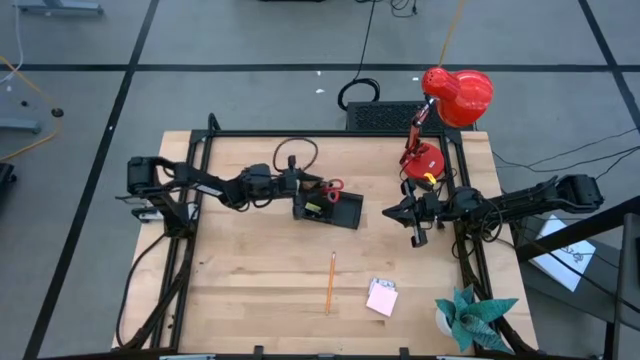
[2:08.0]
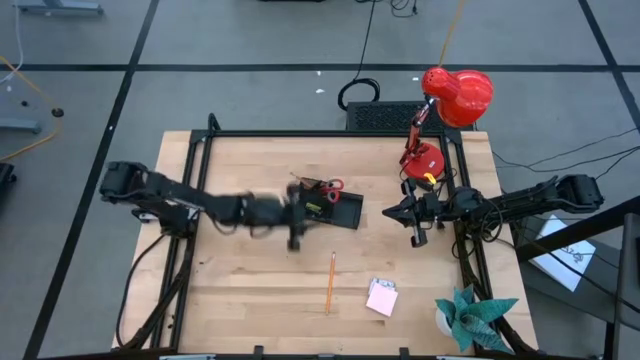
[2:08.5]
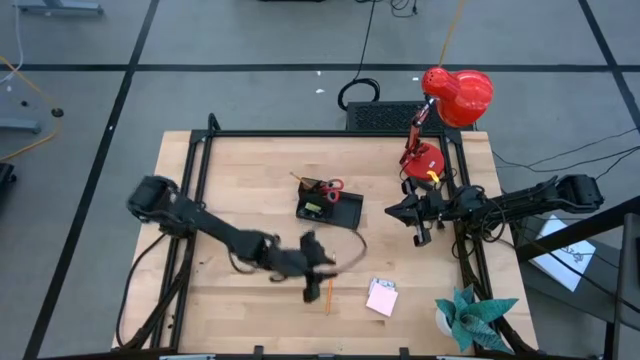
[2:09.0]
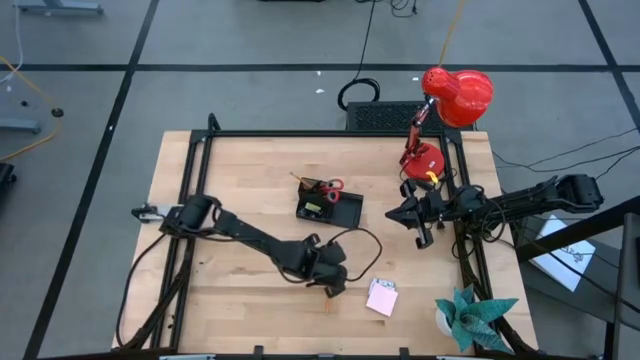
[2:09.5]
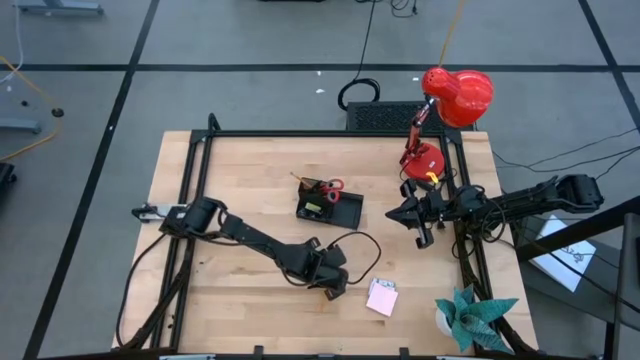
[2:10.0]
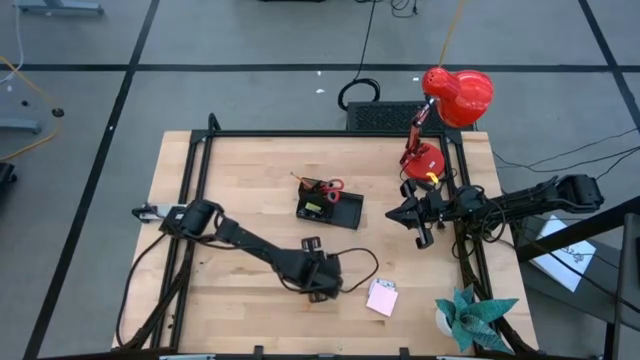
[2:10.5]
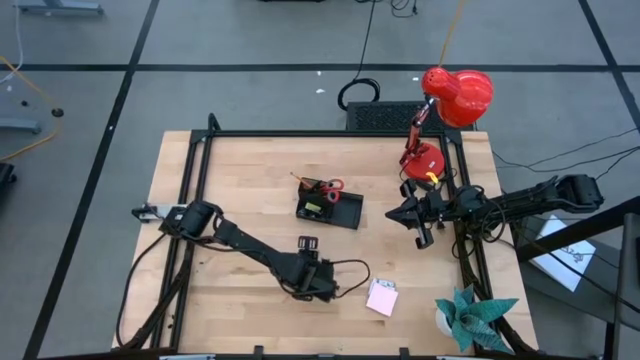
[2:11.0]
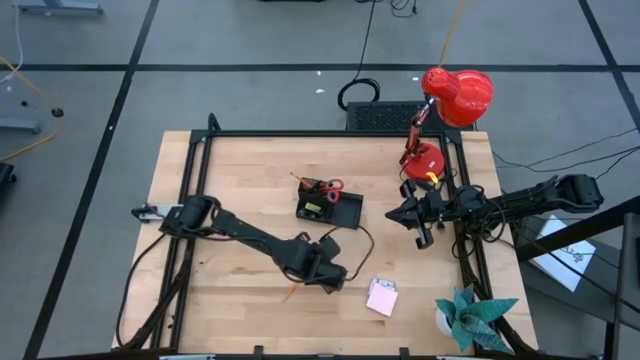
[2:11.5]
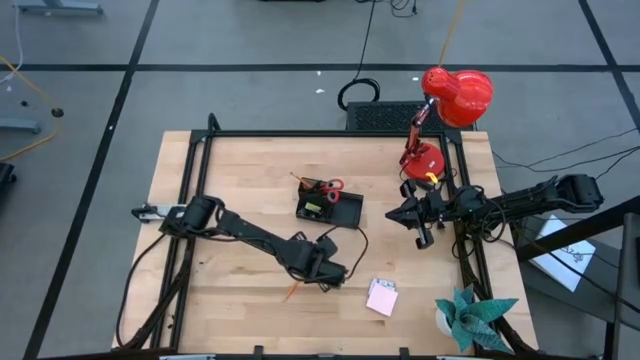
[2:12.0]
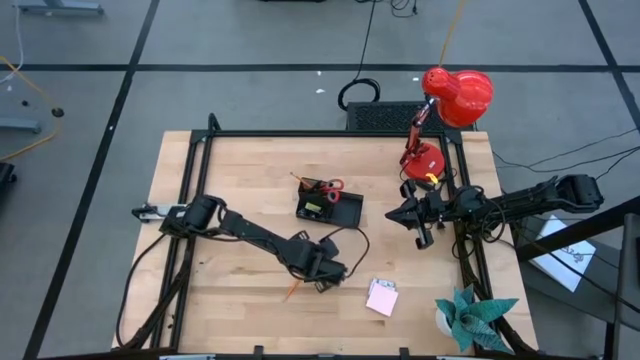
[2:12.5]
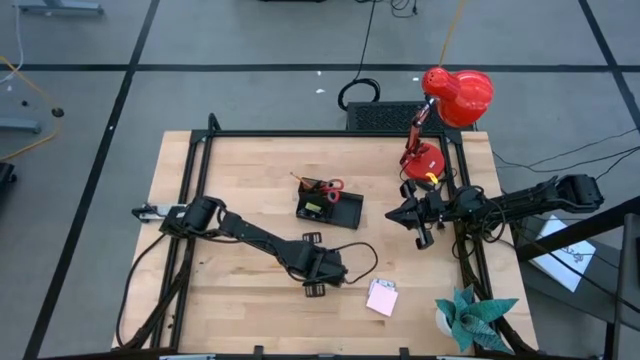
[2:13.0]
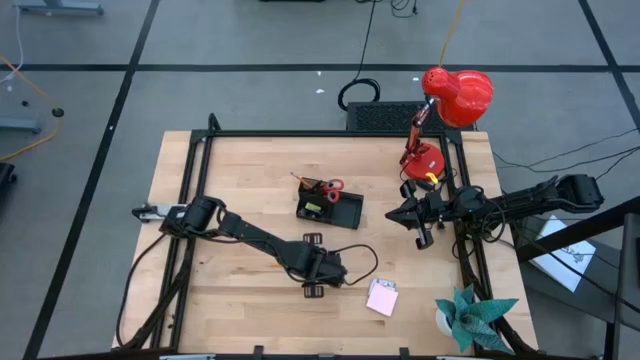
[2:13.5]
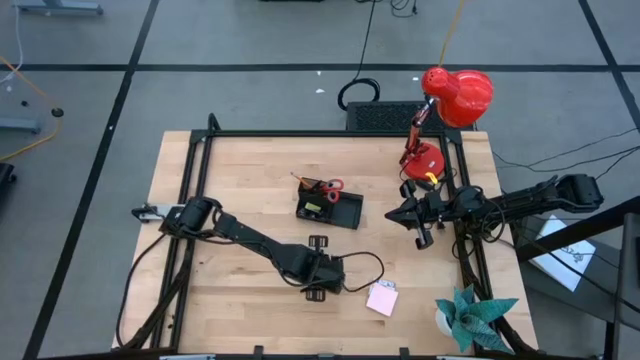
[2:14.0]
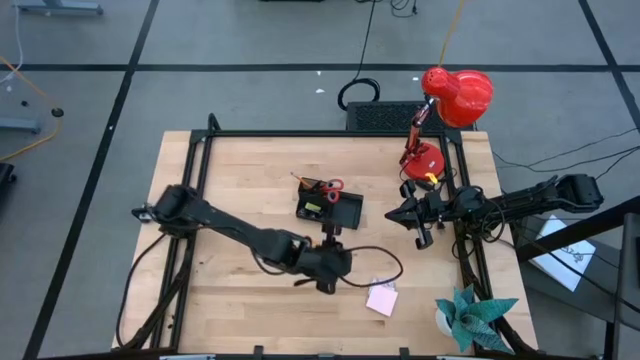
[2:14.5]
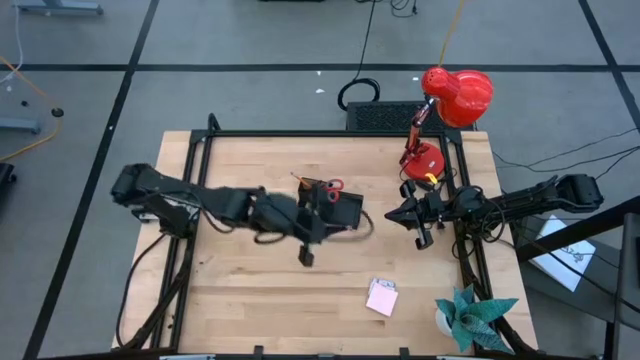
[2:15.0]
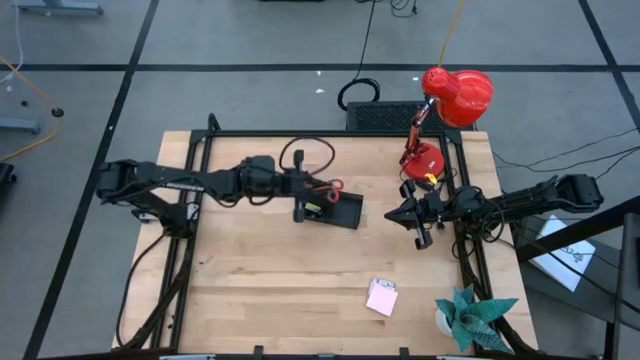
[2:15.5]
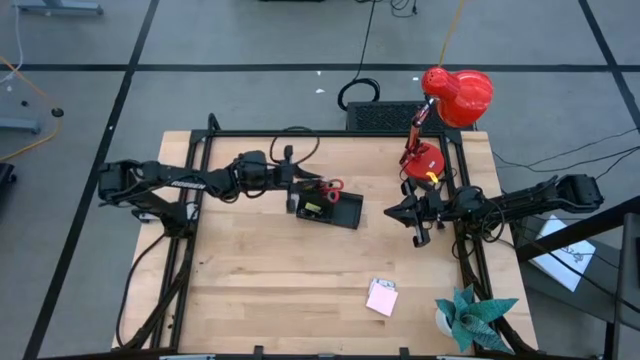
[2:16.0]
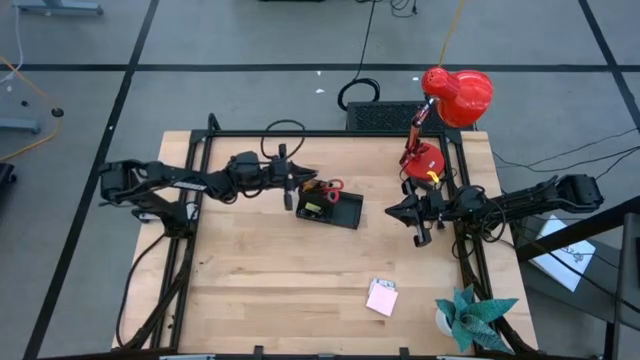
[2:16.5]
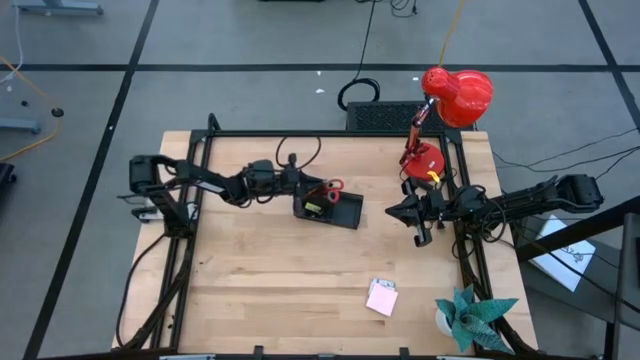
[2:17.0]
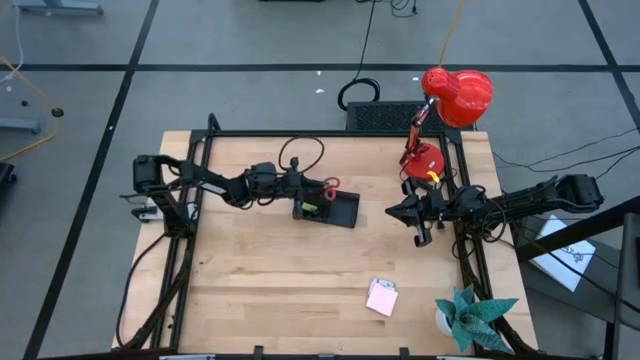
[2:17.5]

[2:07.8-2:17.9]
Task: Pick and place office supplies into organizer
Put the pencil into the desk organizer

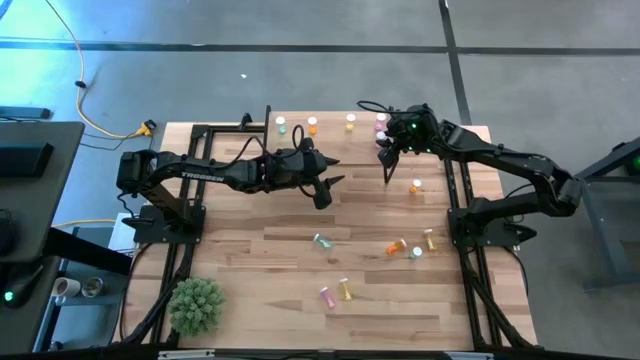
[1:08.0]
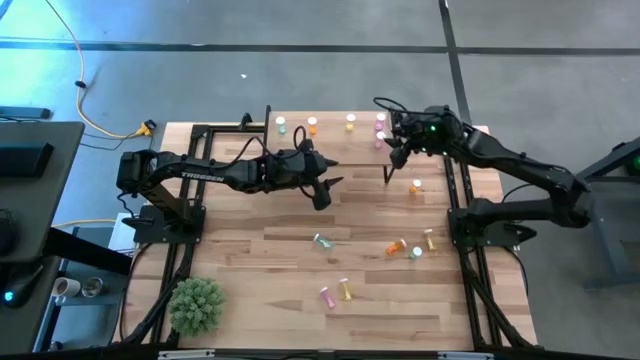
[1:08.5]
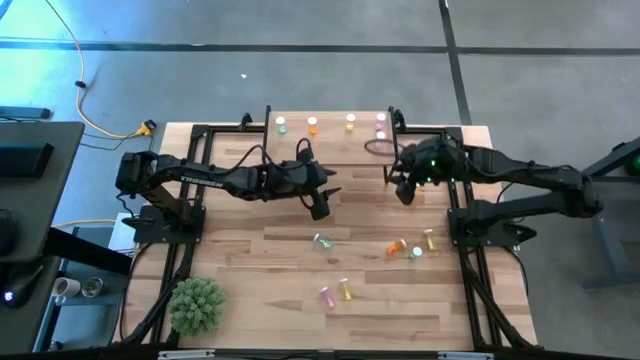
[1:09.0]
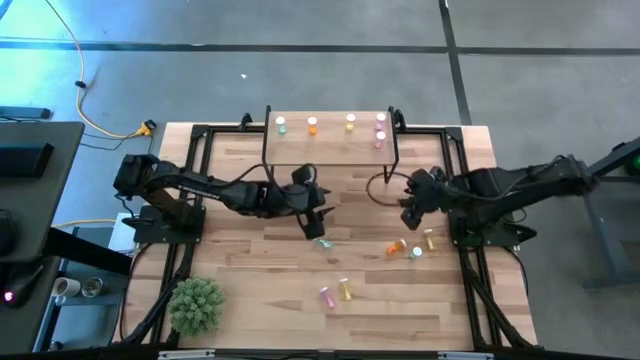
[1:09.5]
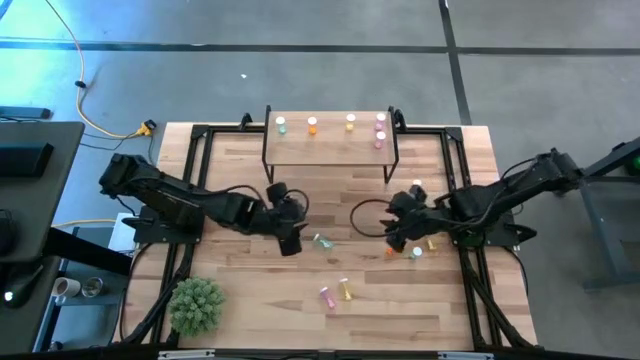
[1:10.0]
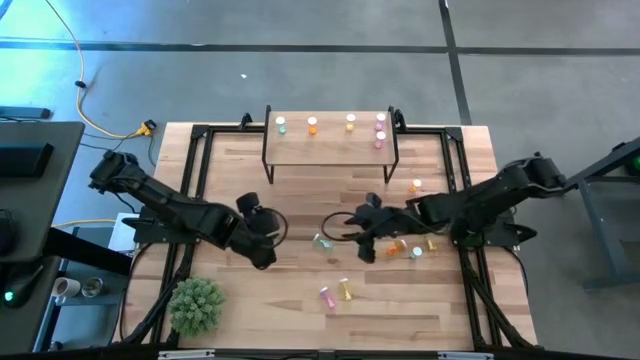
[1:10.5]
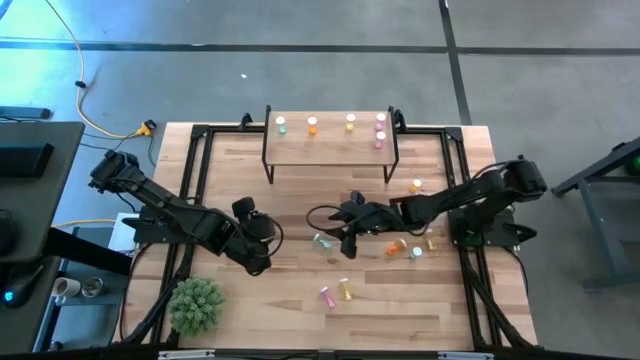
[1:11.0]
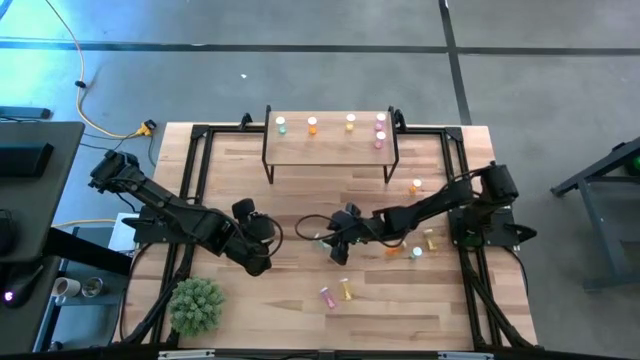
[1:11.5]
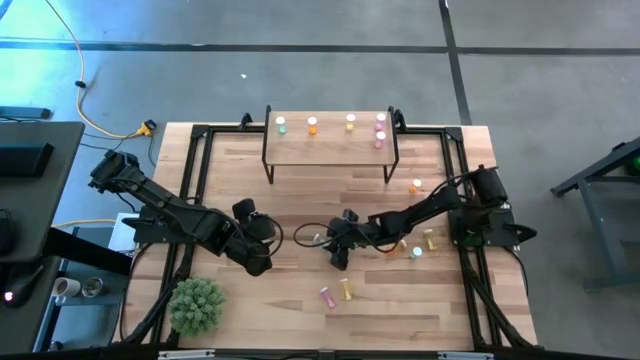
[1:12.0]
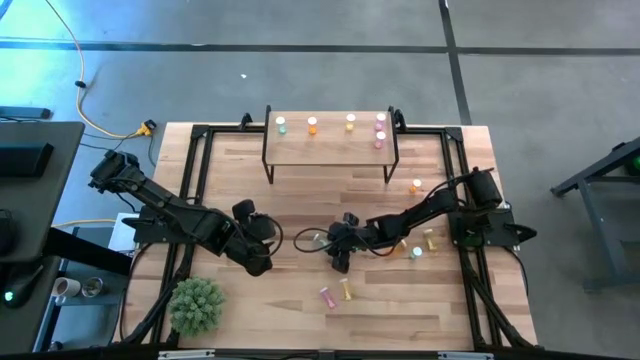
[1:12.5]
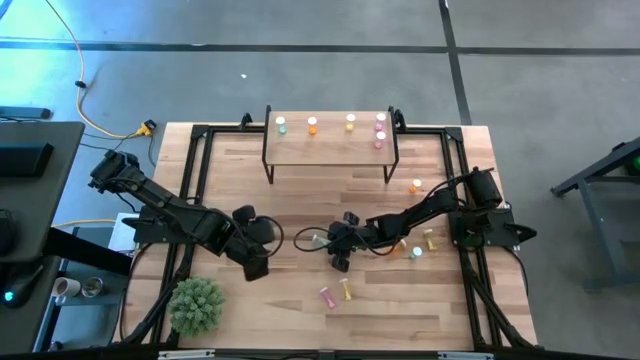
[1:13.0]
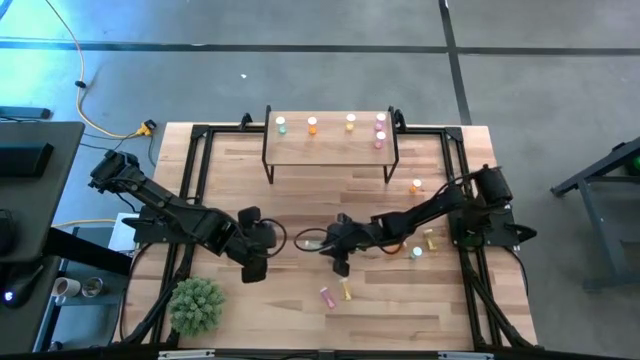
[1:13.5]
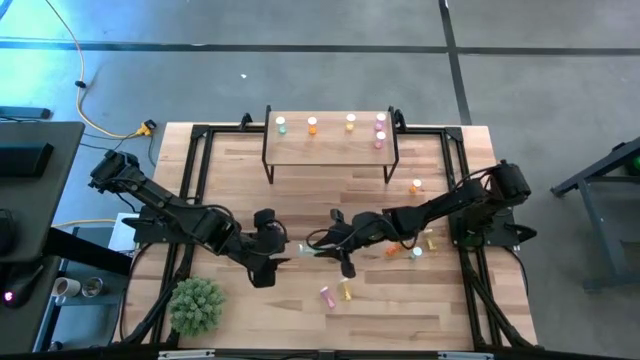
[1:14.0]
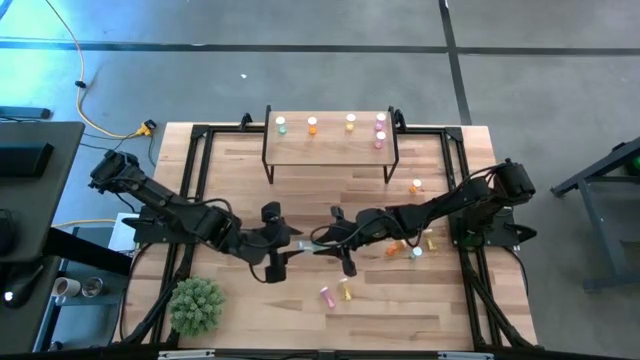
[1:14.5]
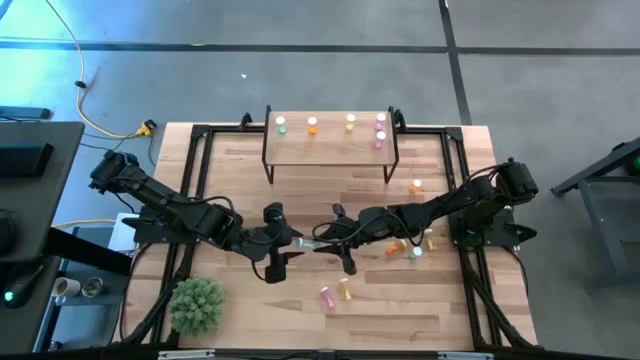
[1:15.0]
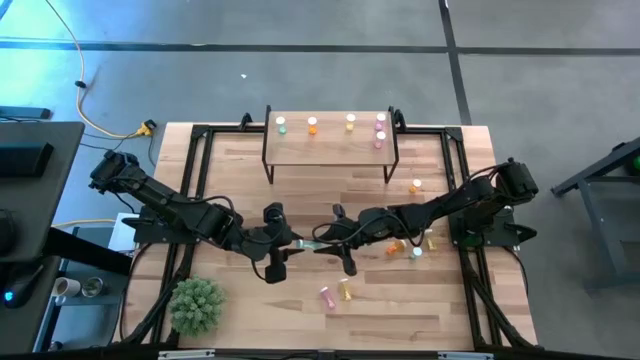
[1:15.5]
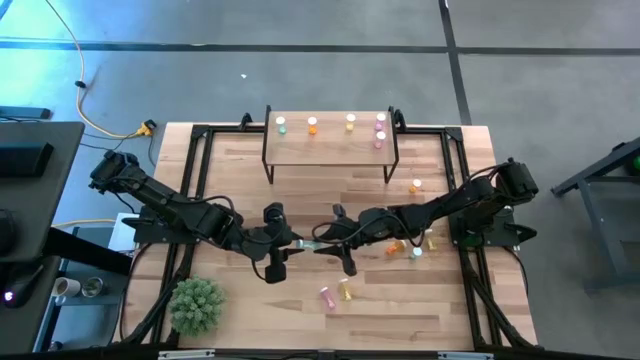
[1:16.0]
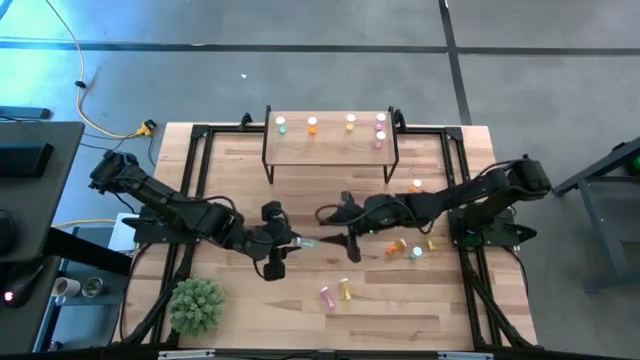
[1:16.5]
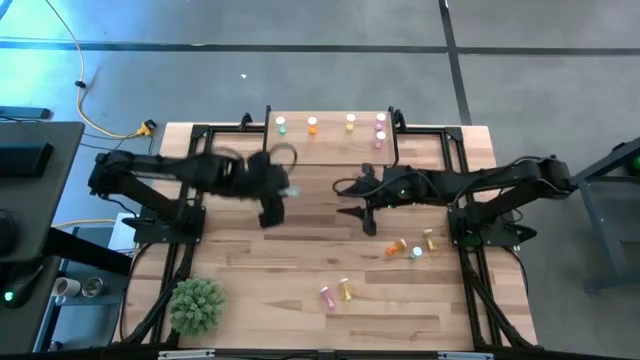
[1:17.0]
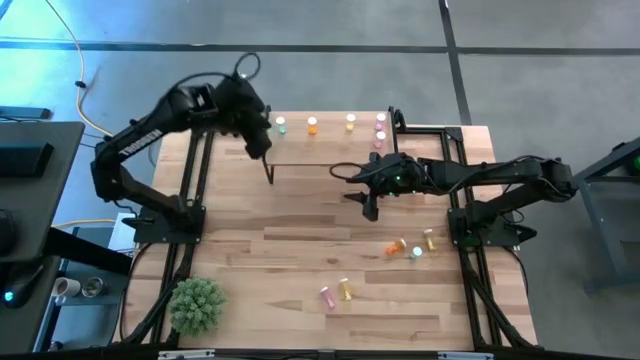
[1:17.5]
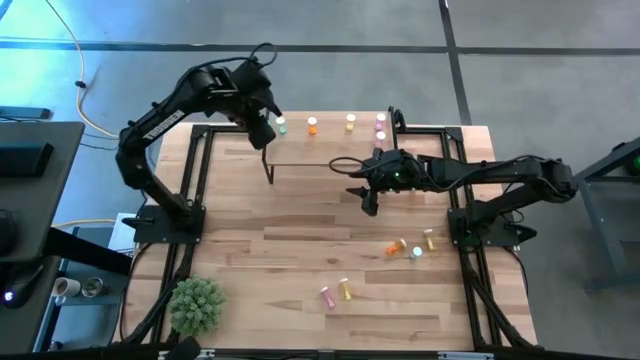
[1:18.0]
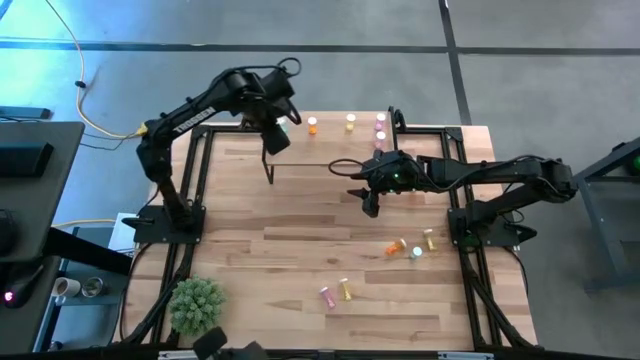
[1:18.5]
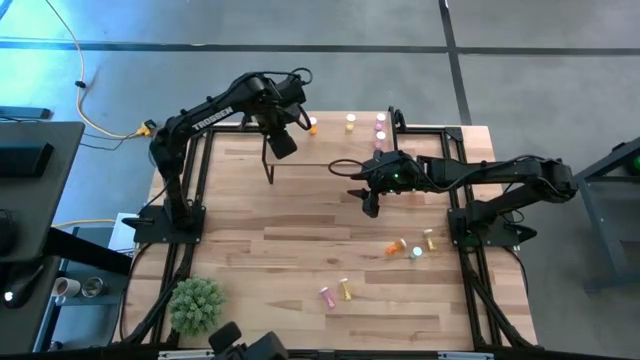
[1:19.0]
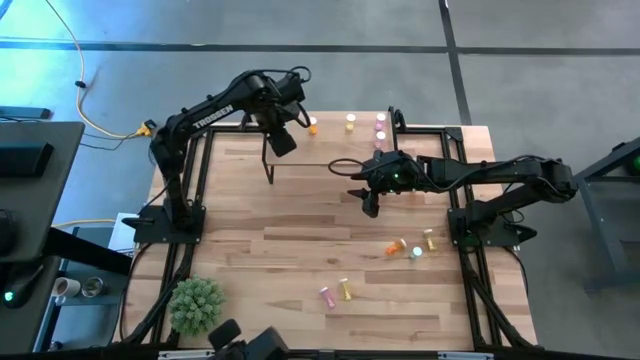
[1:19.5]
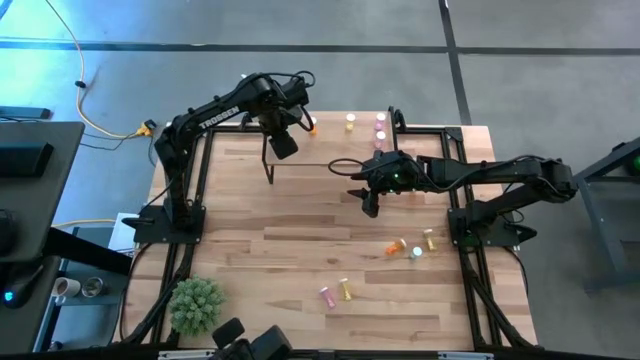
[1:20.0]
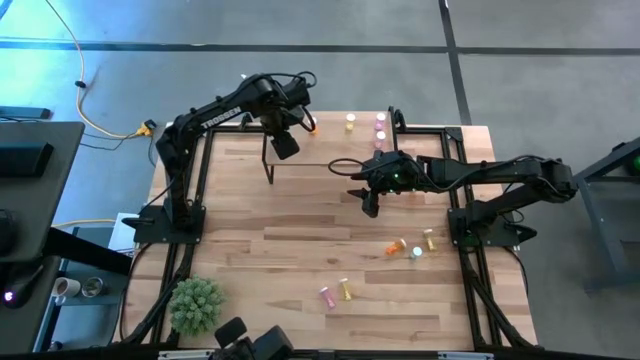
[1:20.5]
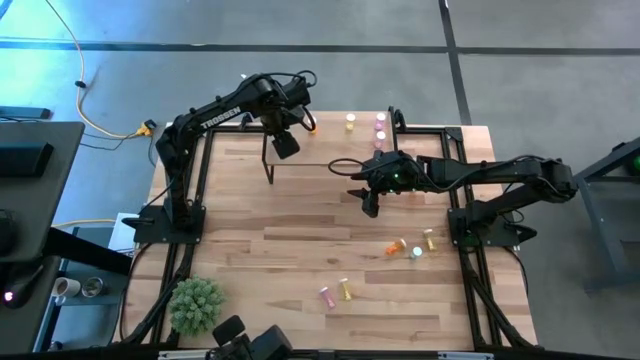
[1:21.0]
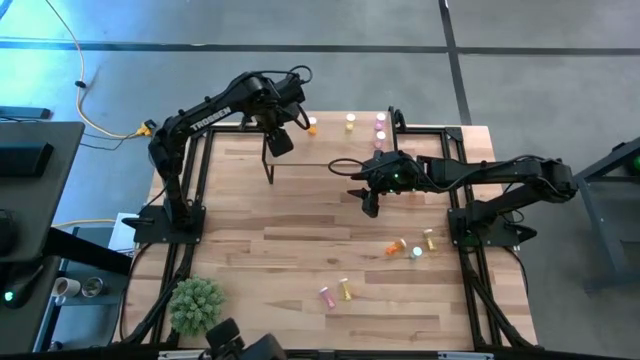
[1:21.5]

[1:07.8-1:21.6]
Task: Pick and place medicine bottles onto shelf by color
Put the left blue pill bottle on the shelf aligned with the other blue pill bottle
